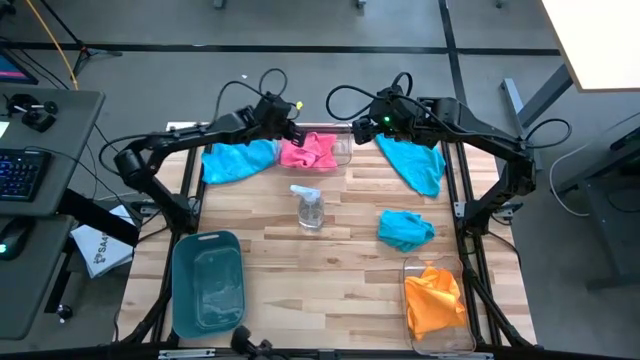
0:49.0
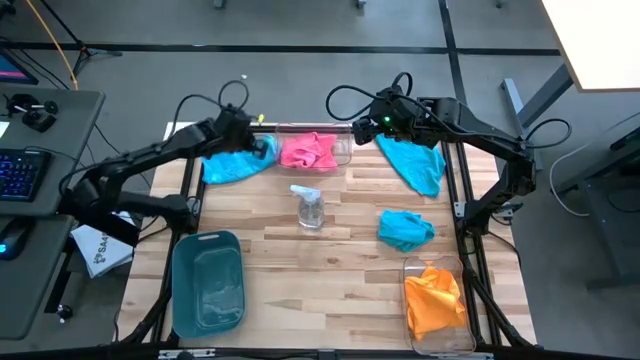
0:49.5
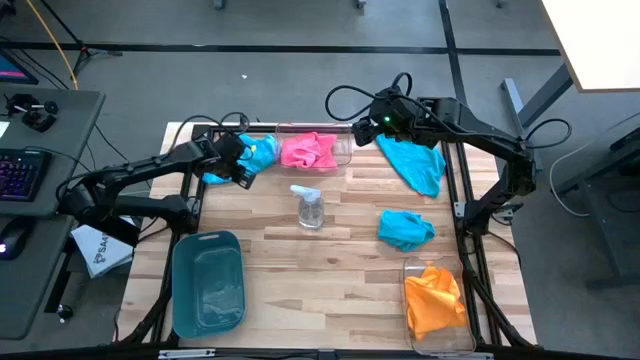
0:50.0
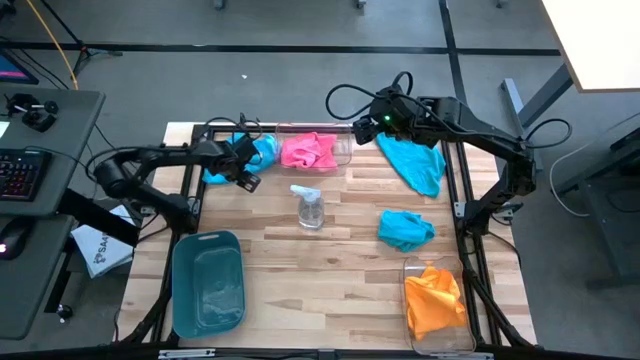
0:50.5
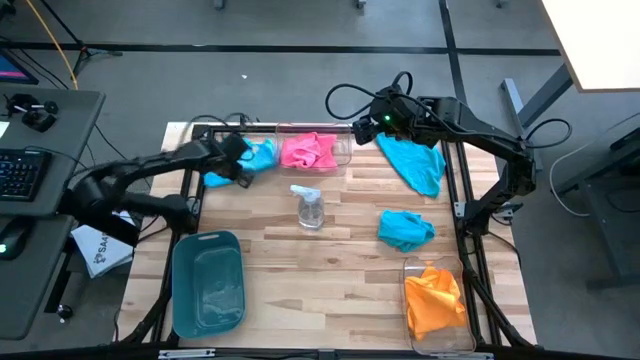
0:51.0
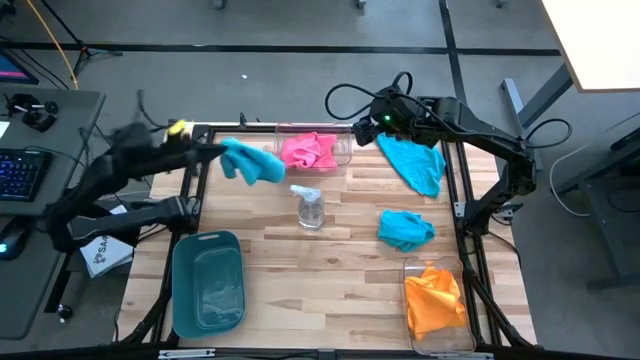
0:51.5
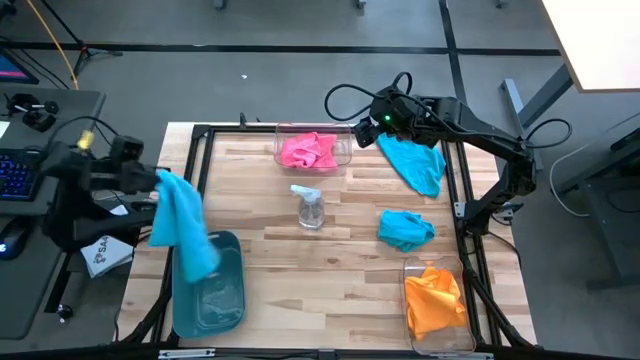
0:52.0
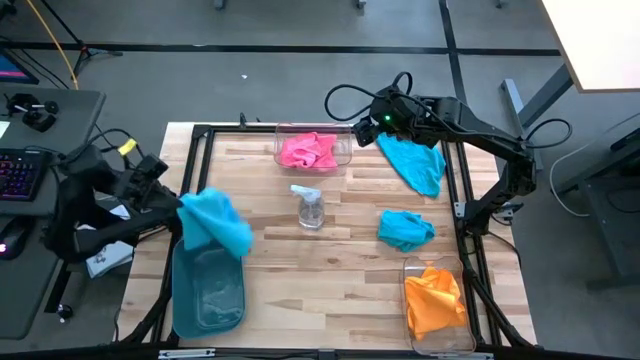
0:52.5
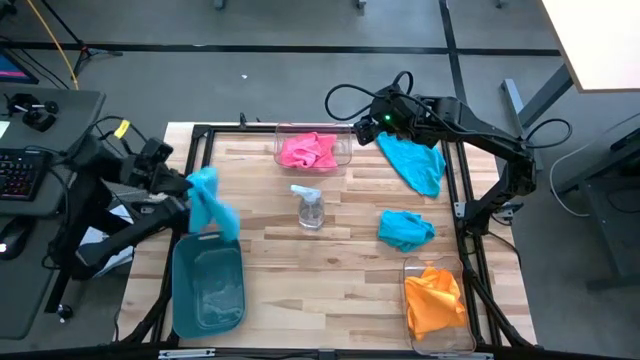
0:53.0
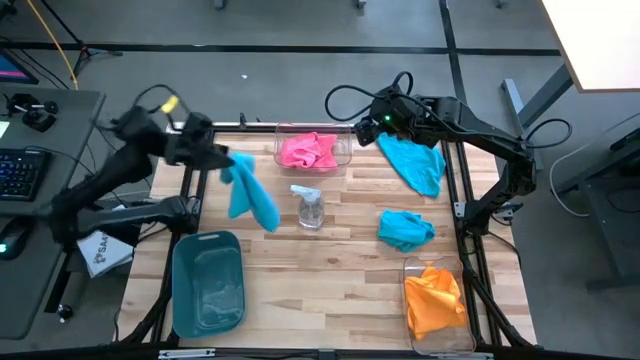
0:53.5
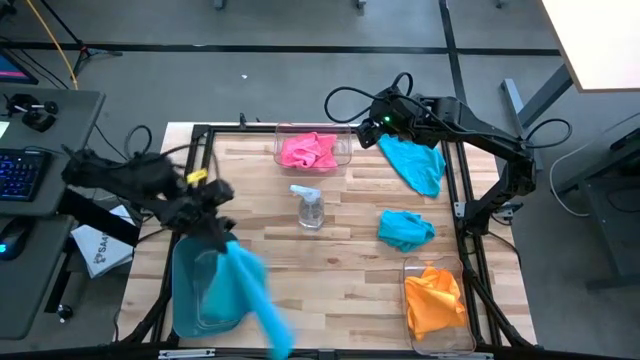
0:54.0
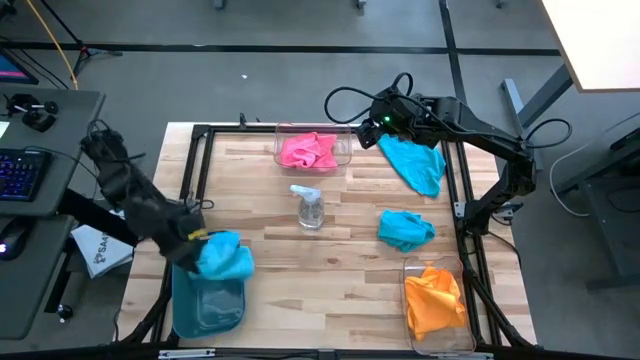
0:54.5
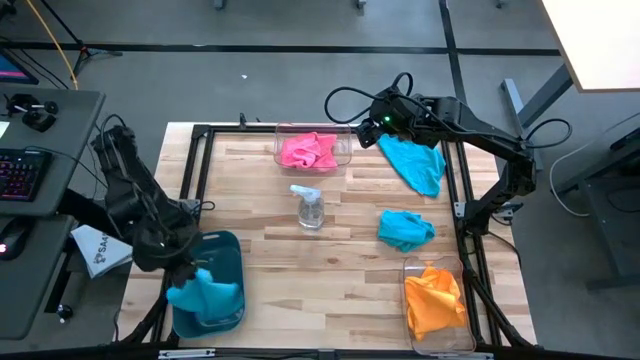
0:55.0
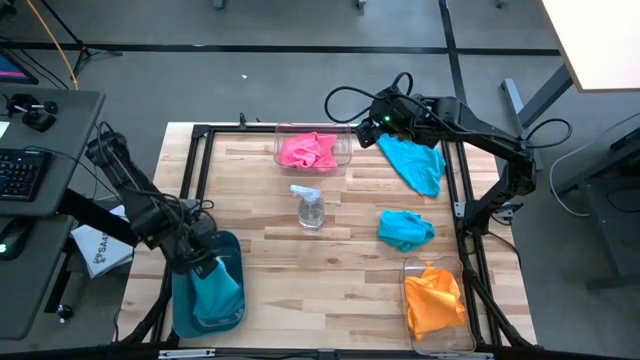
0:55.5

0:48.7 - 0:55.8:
Task: Sort microfiber towel by color & place in baskets
Put the top left blue towel into the blue bin

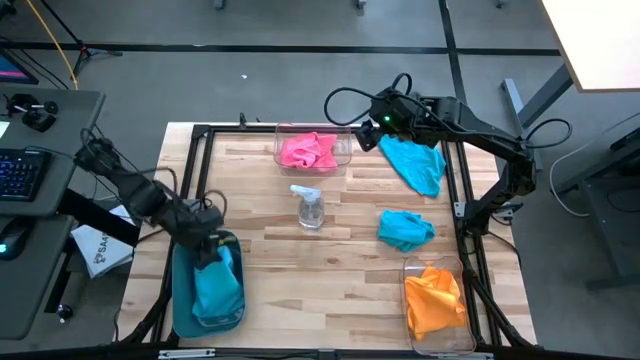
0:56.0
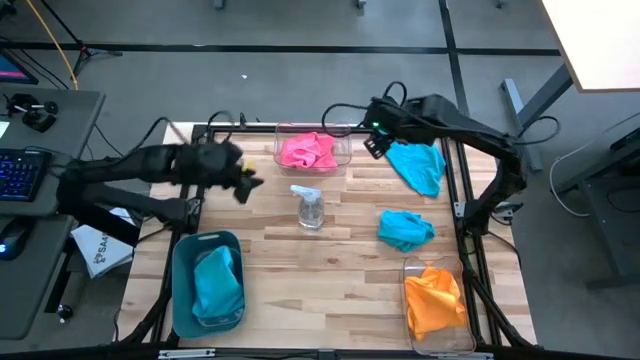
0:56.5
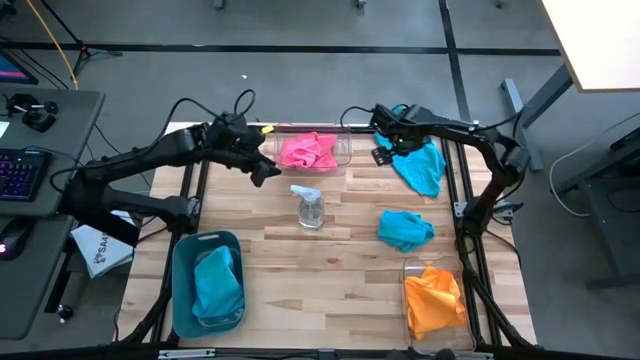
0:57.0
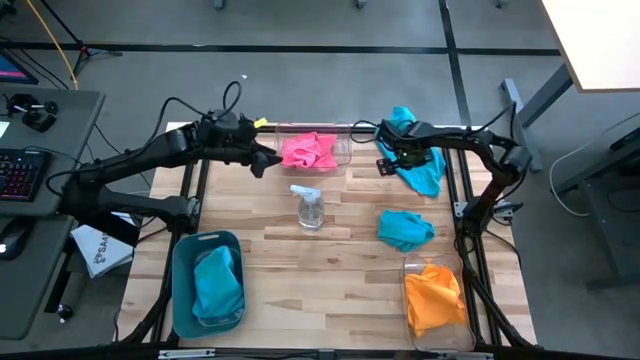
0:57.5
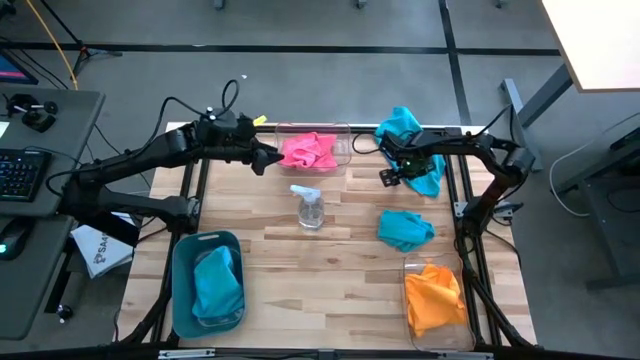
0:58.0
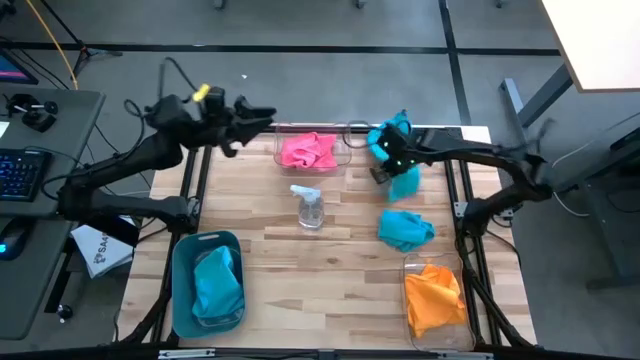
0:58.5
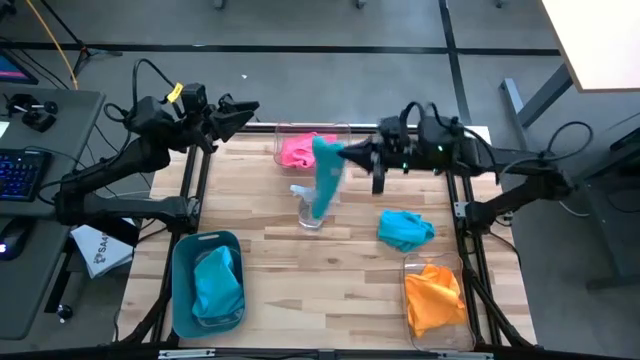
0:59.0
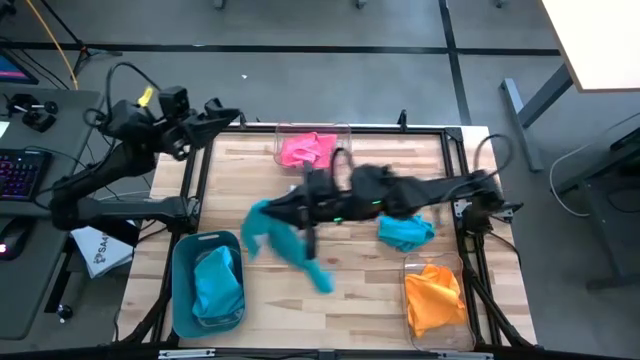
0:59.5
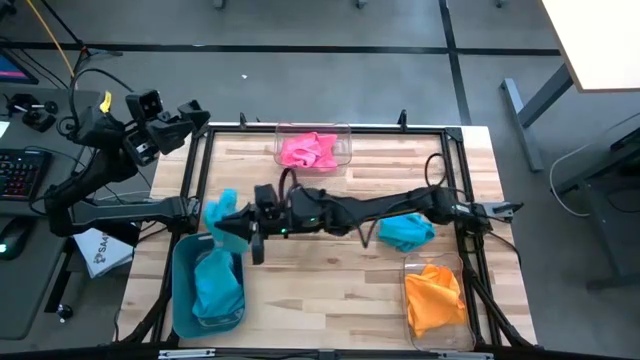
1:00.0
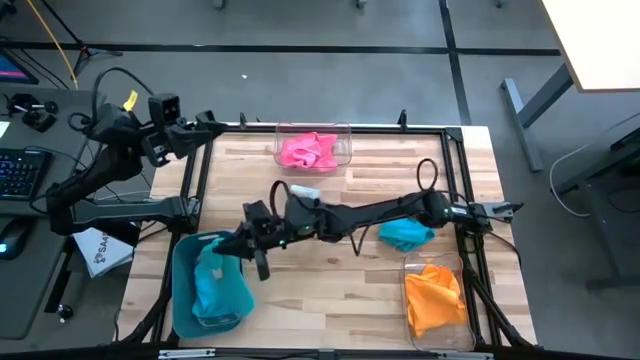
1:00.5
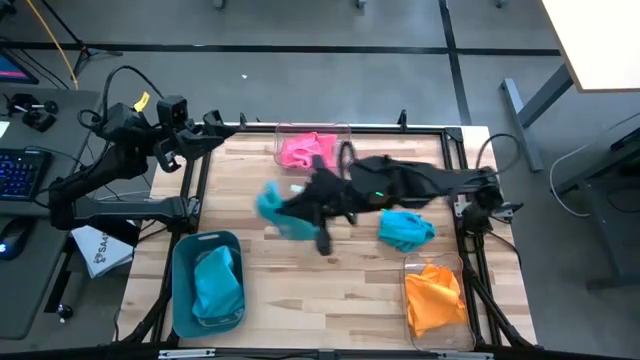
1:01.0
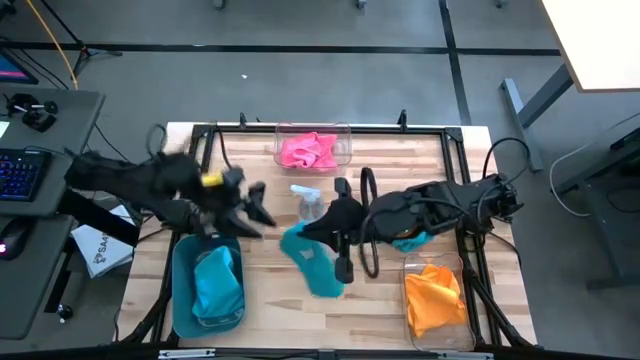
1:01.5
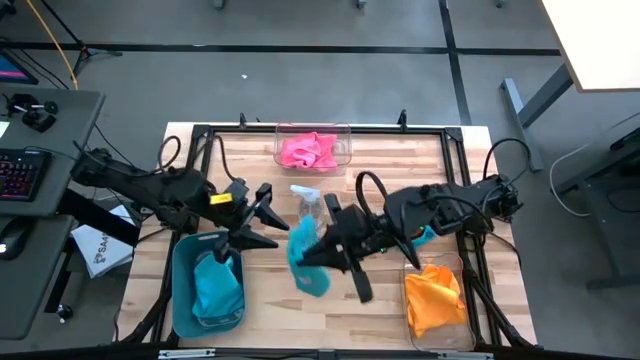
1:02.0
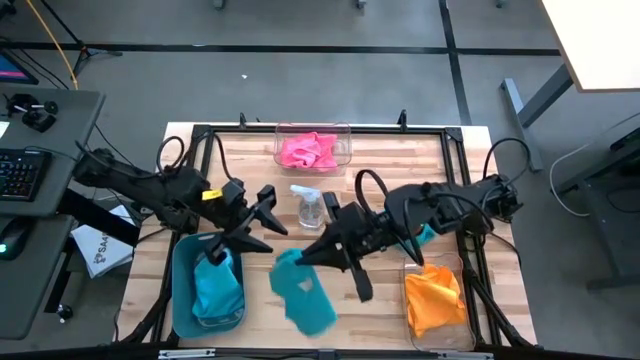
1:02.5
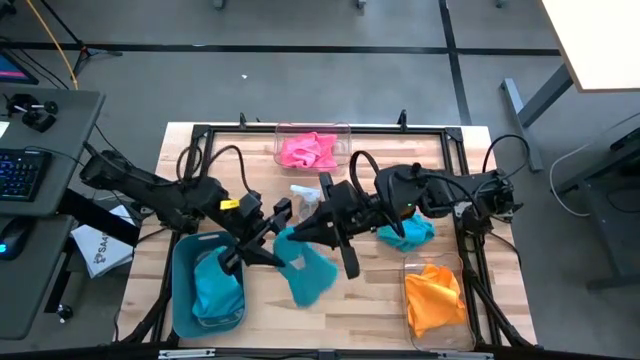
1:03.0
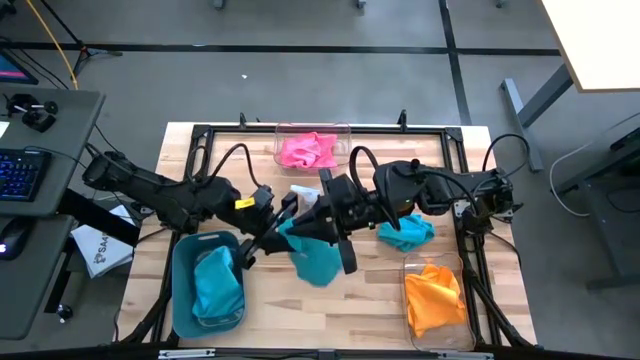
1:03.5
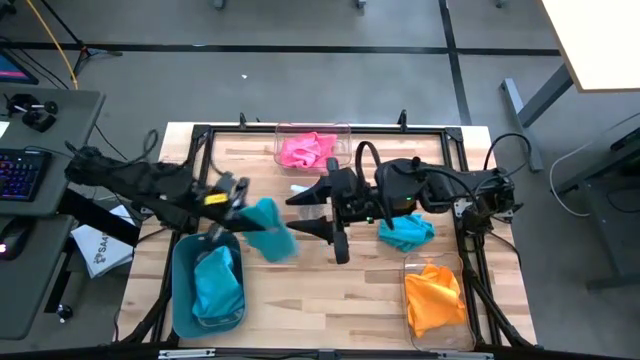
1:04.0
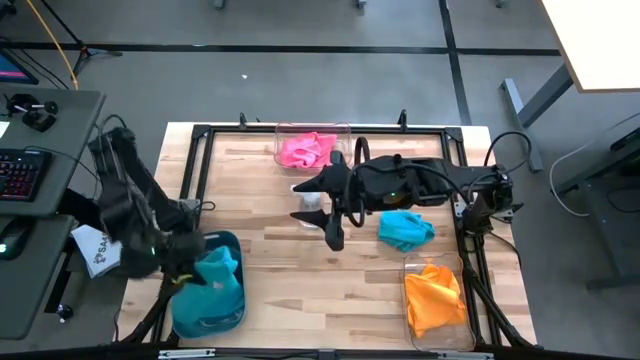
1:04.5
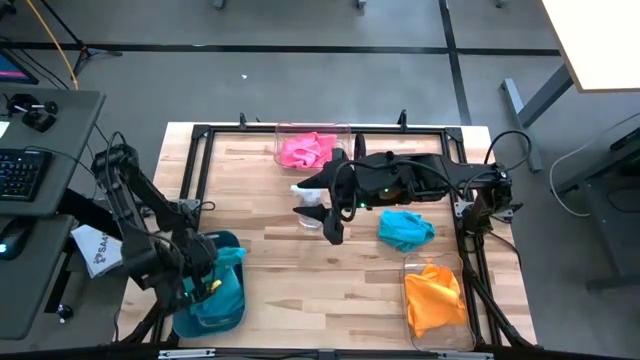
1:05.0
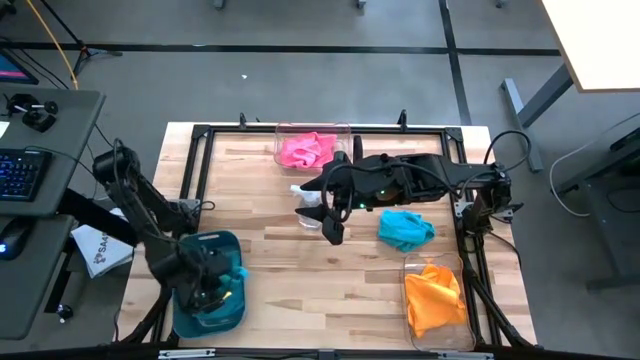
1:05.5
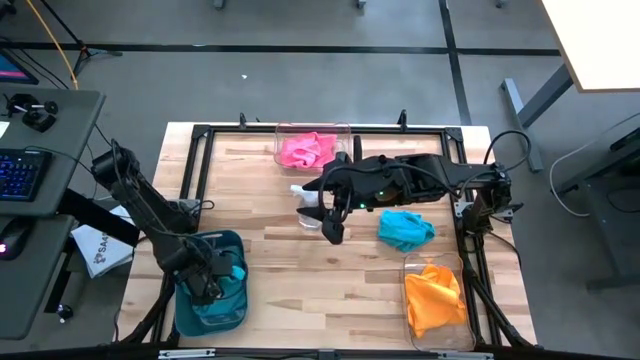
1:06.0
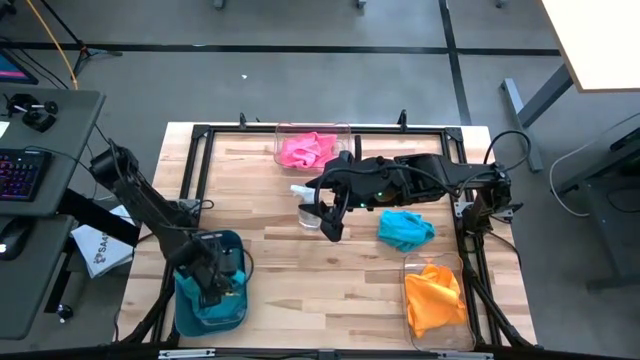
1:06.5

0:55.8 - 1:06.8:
Put the top blue towel into the blue bin

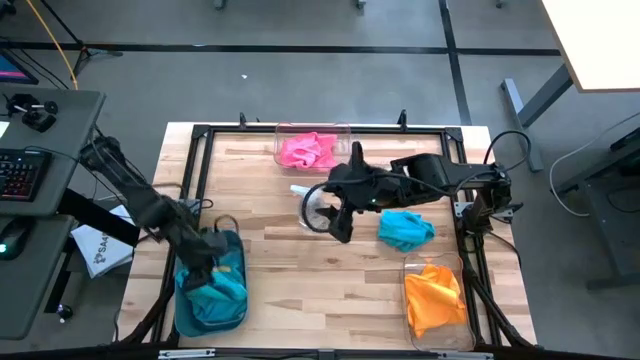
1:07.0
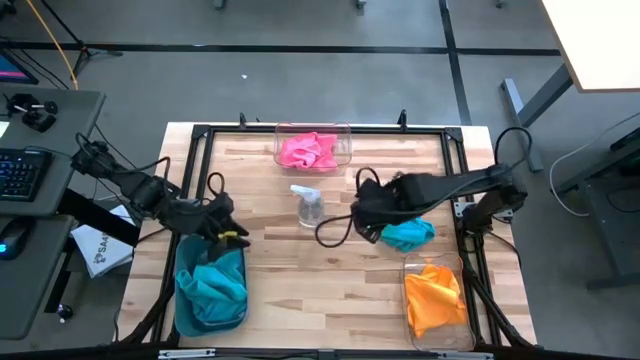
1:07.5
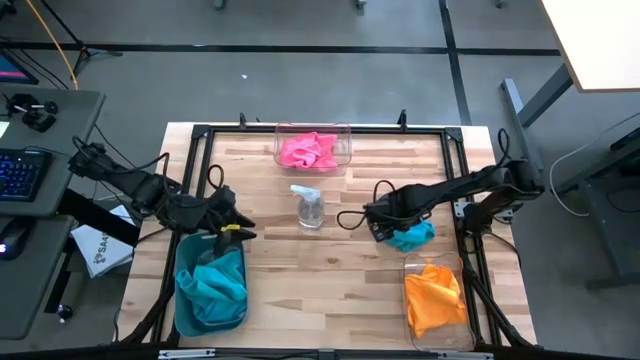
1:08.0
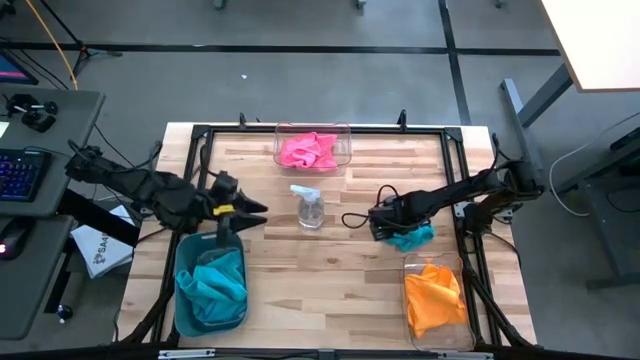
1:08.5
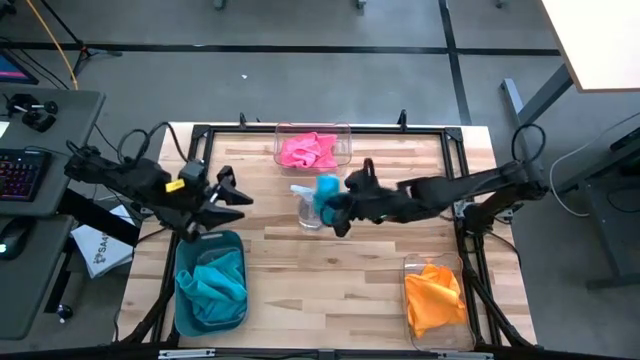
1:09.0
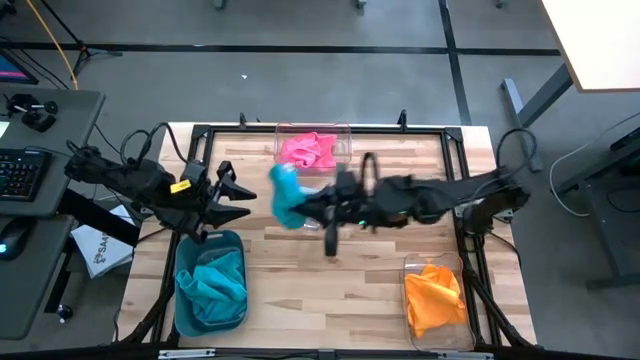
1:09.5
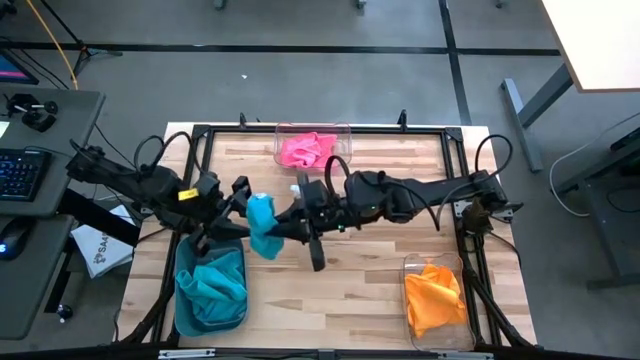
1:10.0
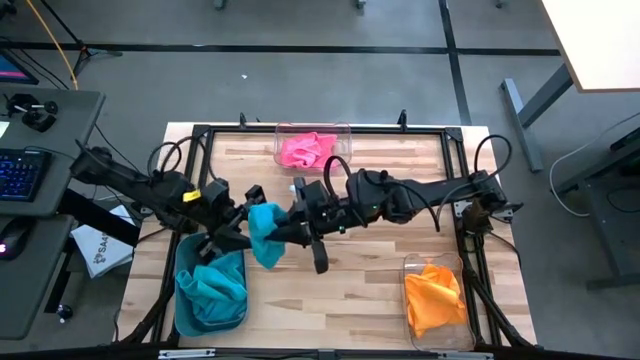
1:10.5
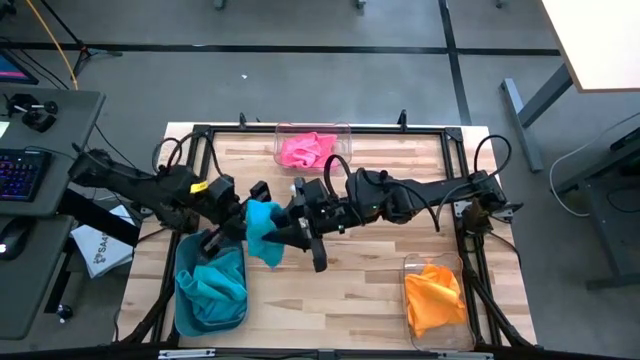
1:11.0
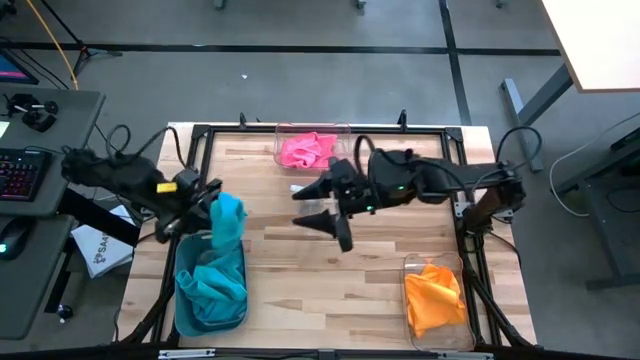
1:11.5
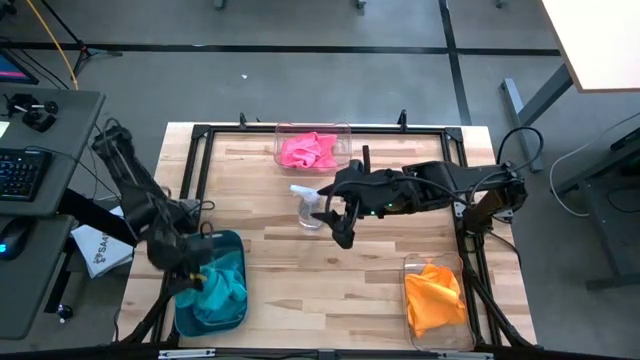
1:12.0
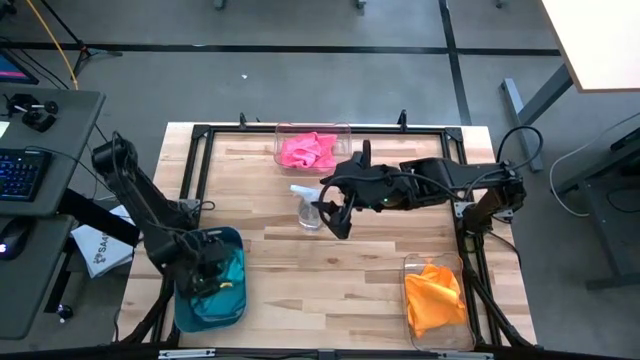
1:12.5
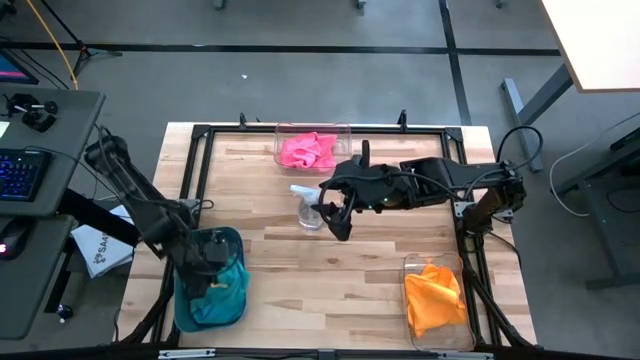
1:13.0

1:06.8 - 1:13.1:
Put the blue towel into the blue bin
